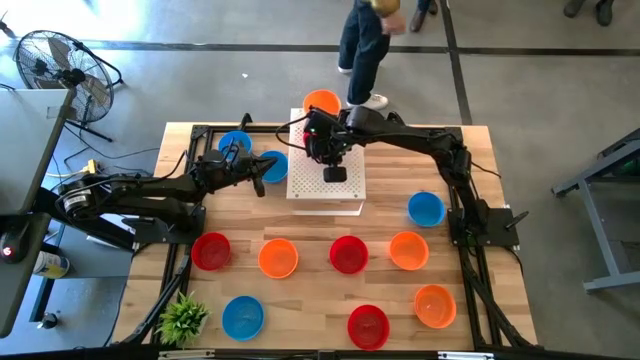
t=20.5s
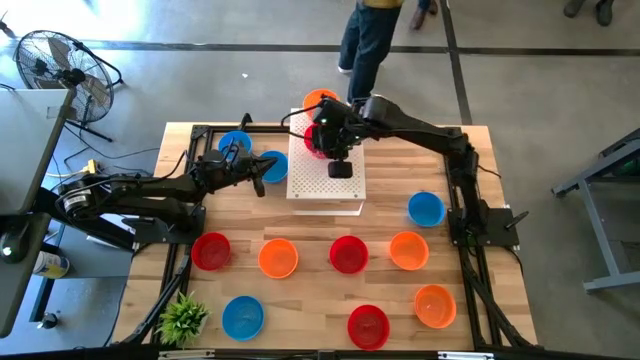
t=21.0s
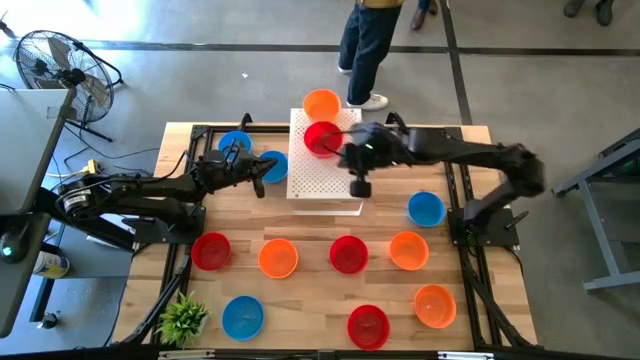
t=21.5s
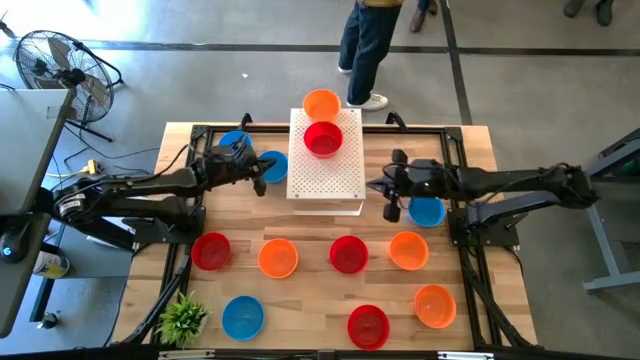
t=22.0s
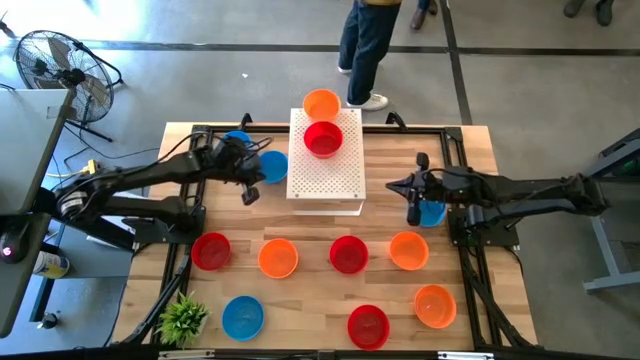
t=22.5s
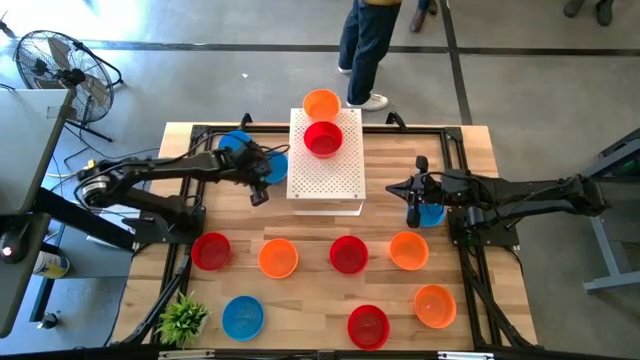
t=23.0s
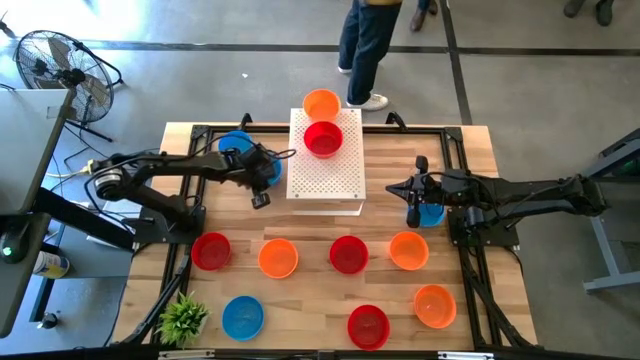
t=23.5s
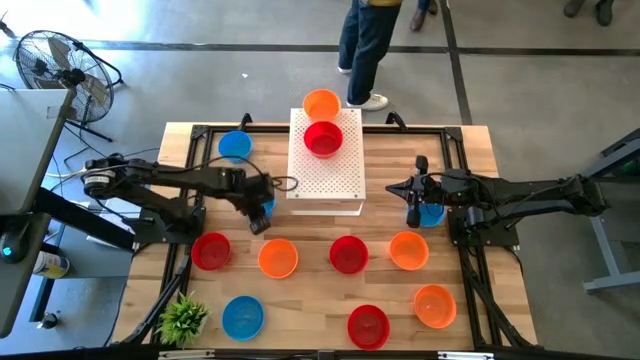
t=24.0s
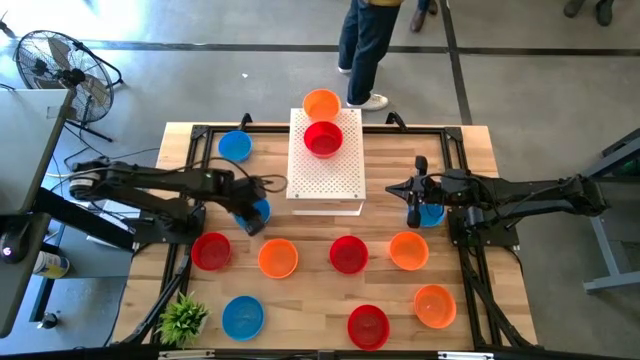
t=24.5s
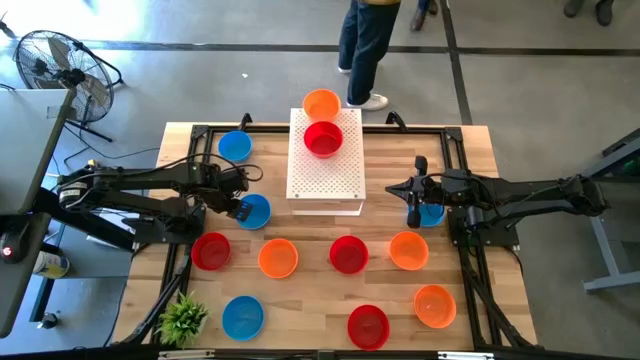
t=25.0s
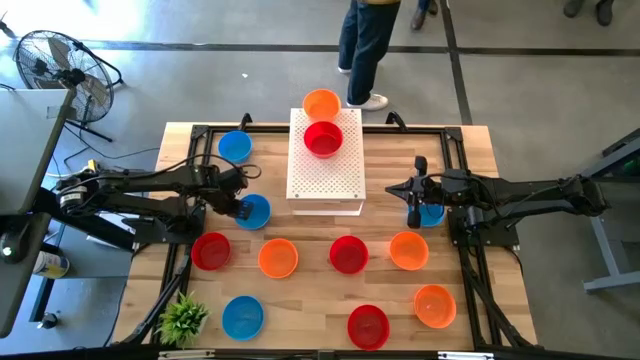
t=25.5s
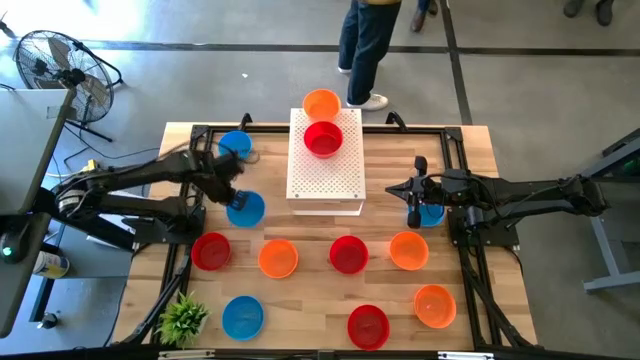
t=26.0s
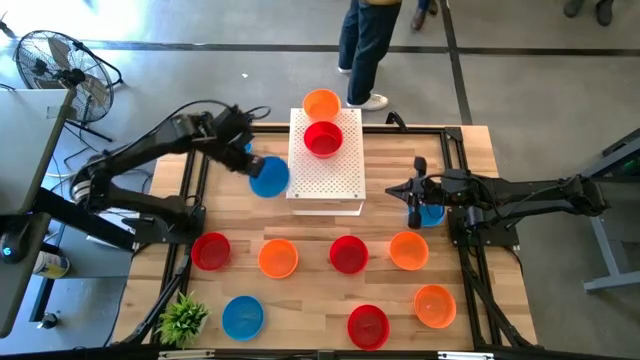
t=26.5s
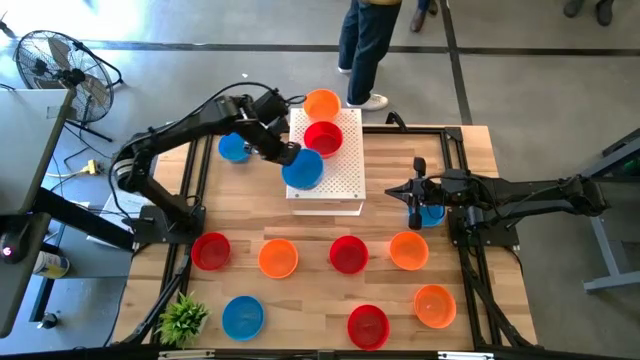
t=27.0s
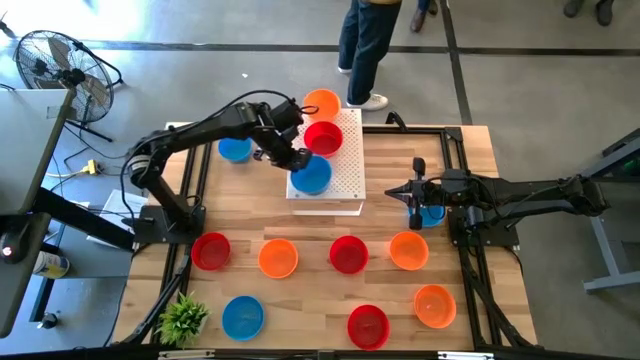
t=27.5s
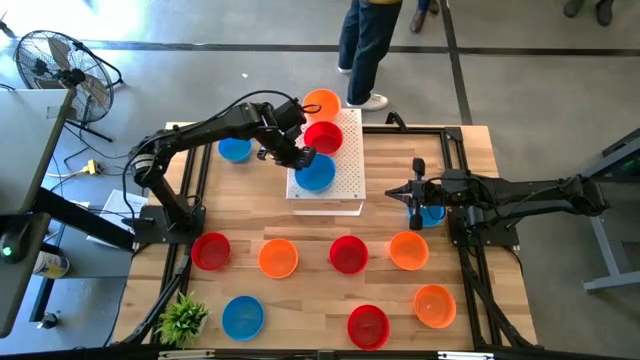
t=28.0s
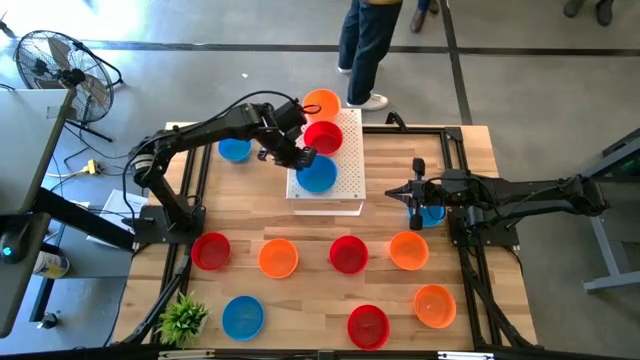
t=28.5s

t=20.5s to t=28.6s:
Task: Pick & Place Mini bowls
Put the blue bowl on the shelf

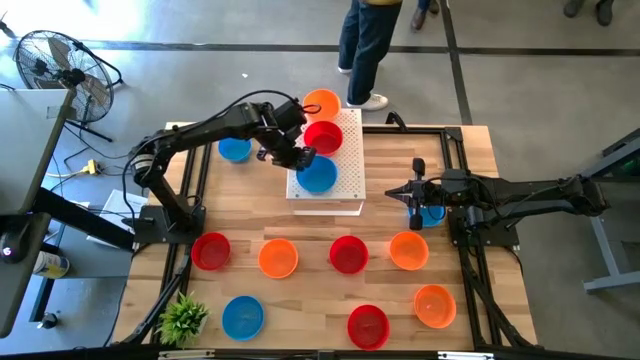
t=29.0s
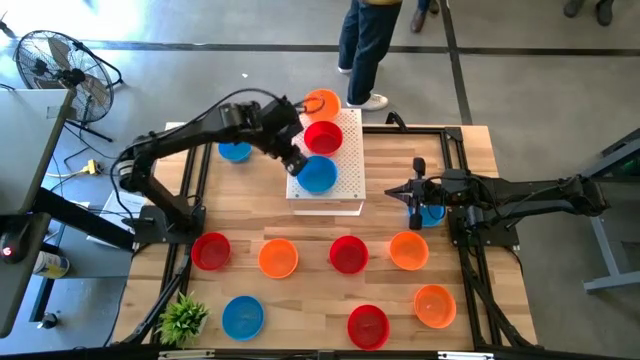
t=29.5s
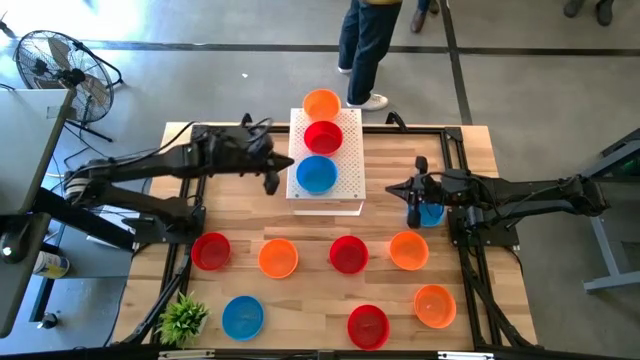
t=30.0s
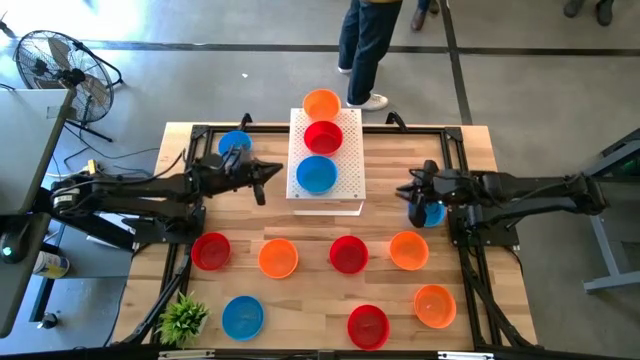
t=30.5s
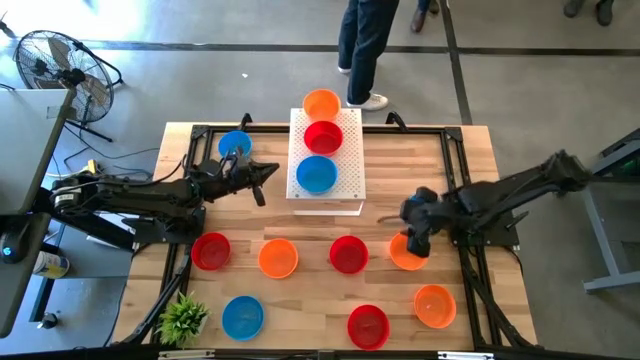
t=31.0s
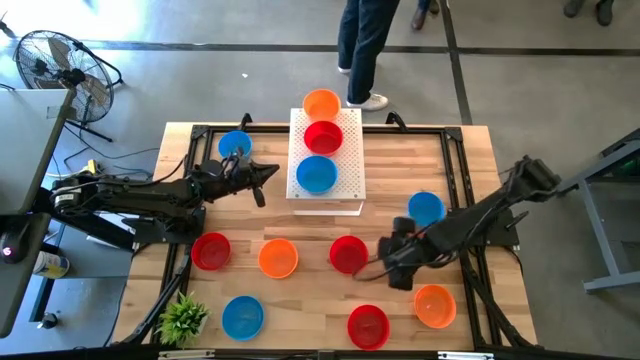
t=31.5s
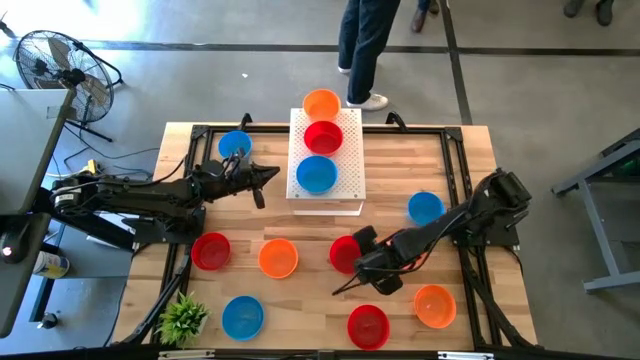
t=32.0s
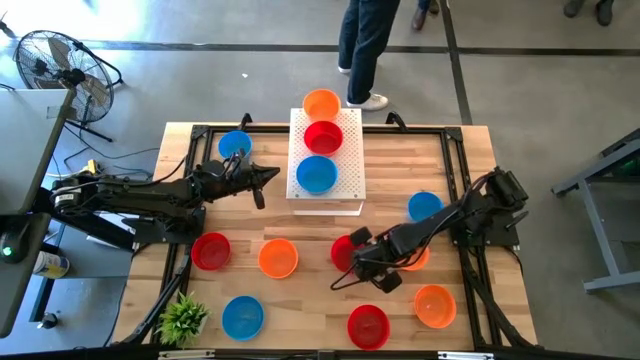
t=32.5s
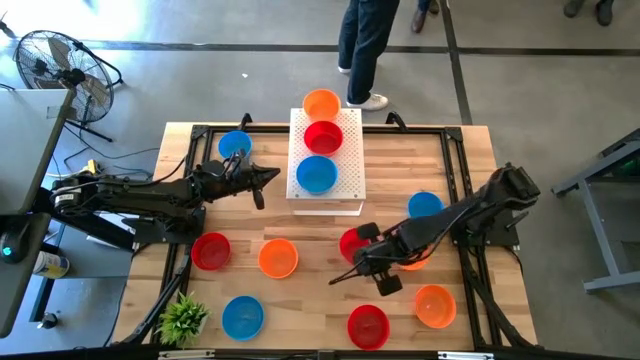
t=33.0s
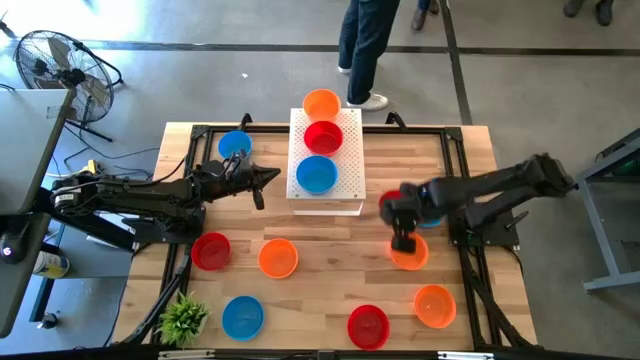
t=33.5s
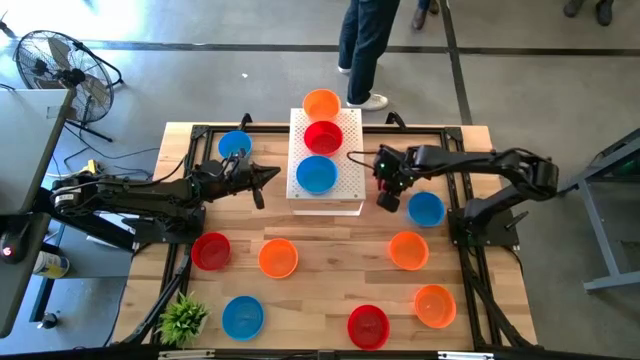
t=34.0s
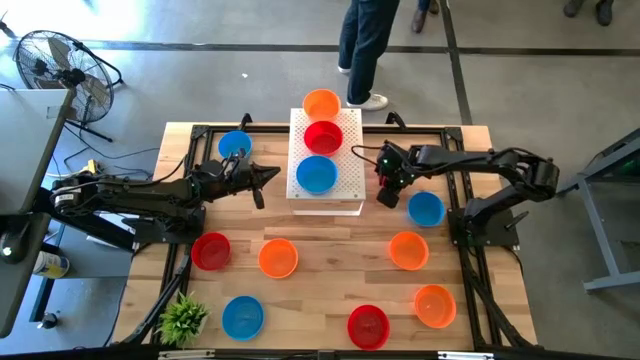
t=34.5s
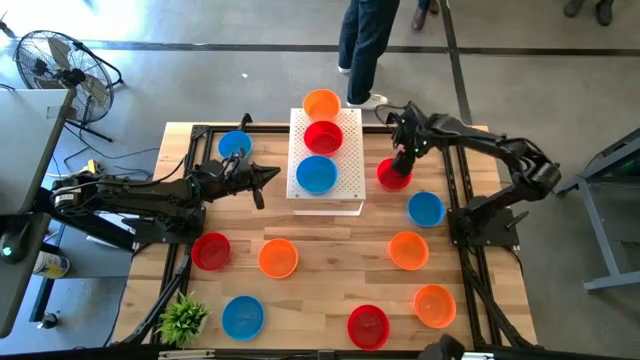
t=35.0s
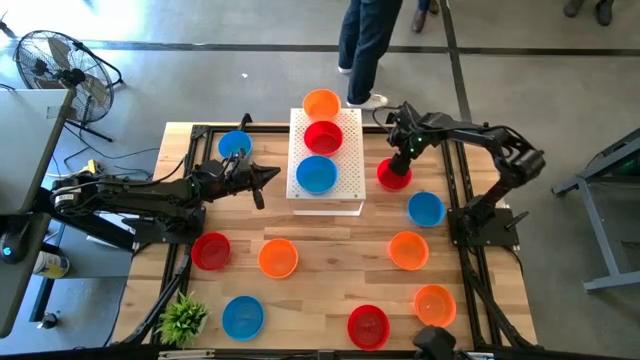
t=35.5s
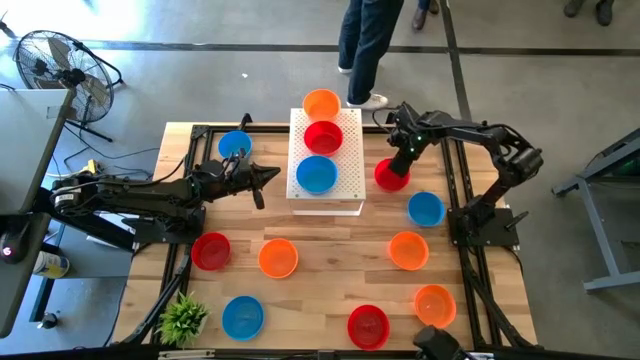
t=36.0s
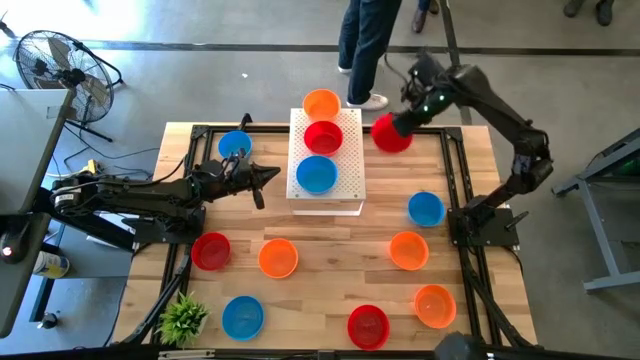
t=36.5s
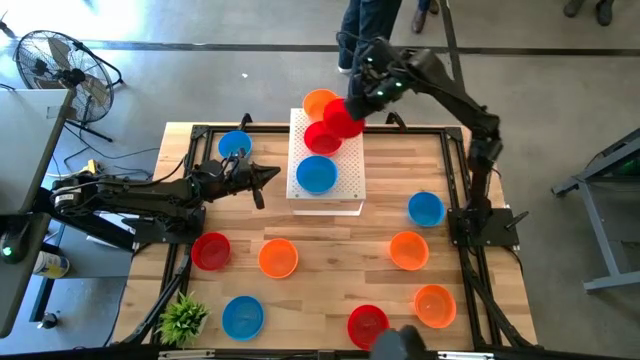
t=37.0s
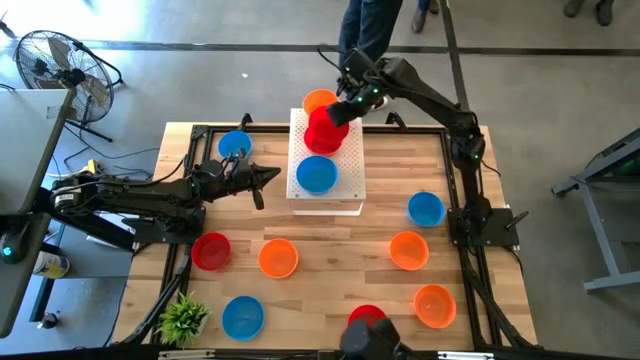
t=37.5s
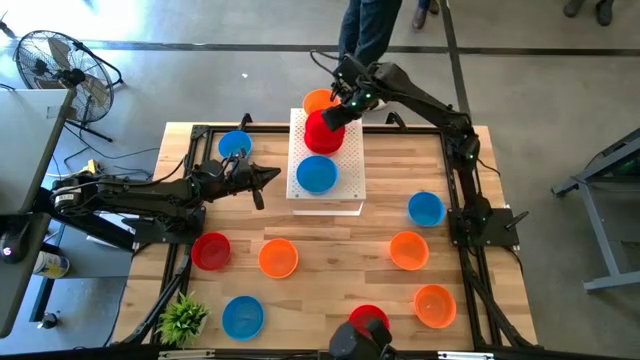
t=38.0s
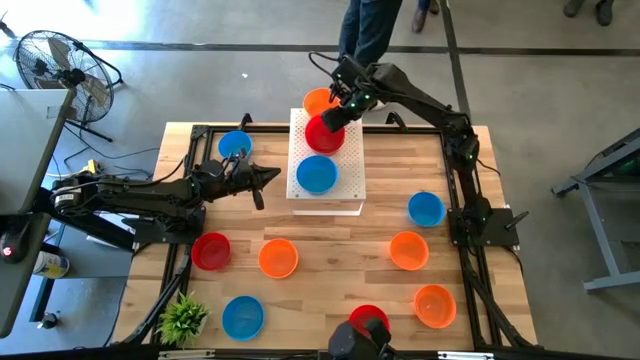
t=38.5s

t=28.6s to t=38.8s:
Stack the red bowl on top of the other red bowl on the shelf

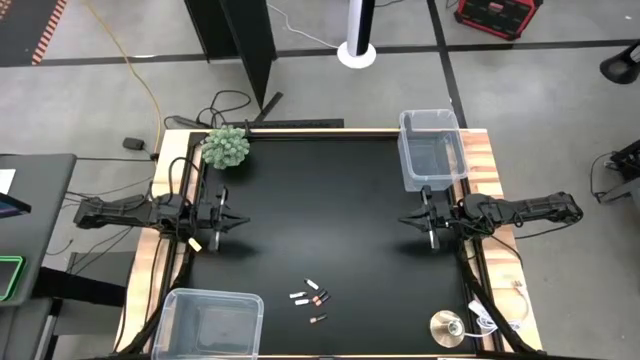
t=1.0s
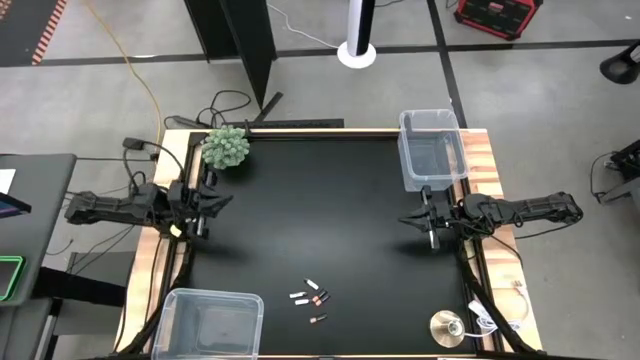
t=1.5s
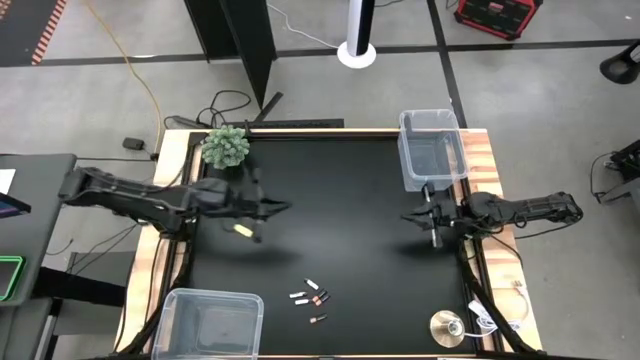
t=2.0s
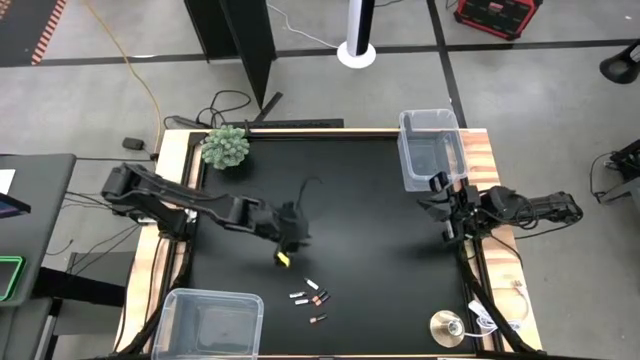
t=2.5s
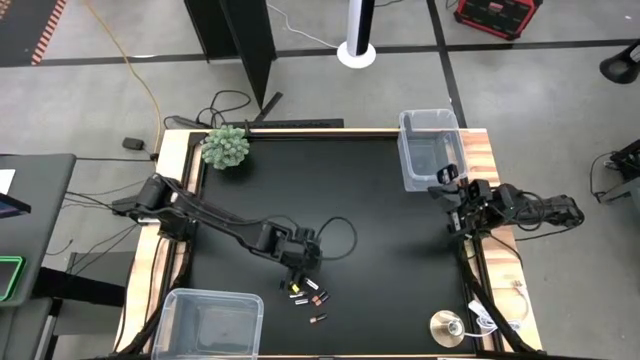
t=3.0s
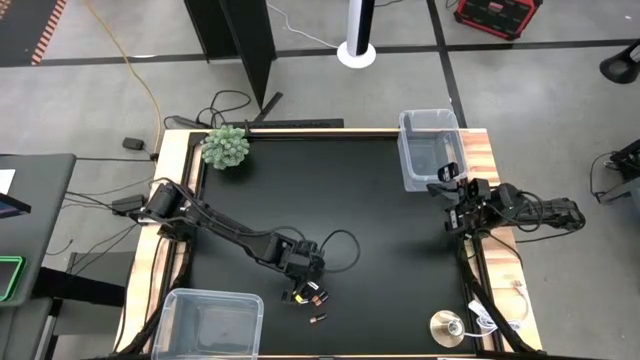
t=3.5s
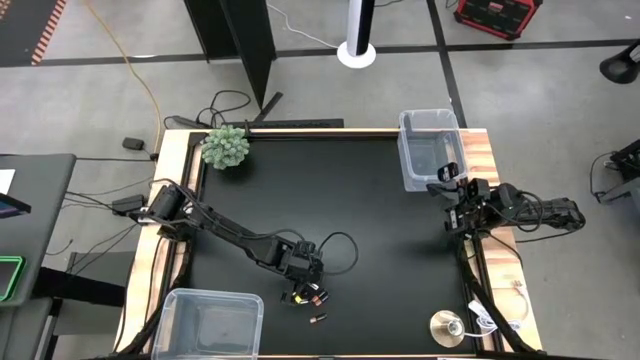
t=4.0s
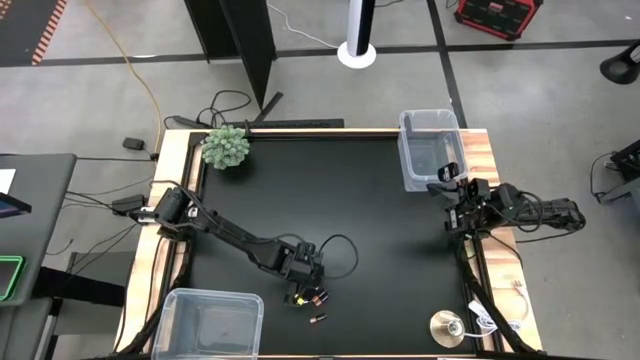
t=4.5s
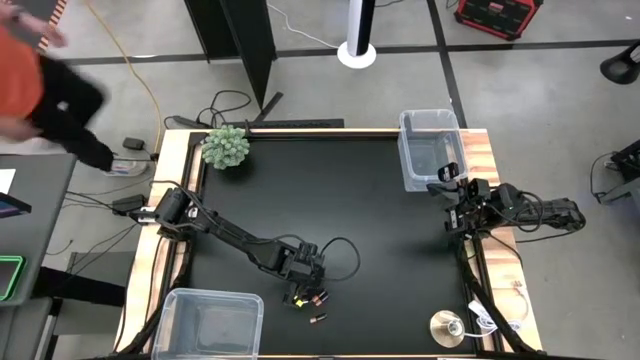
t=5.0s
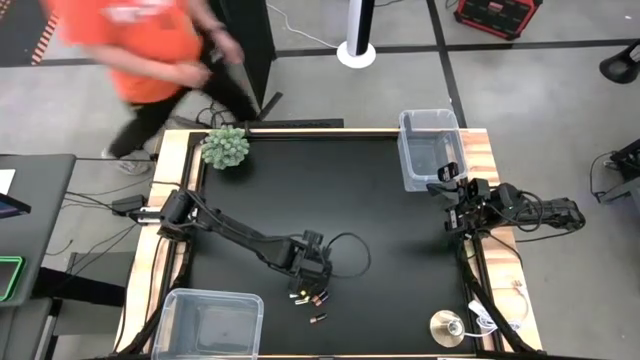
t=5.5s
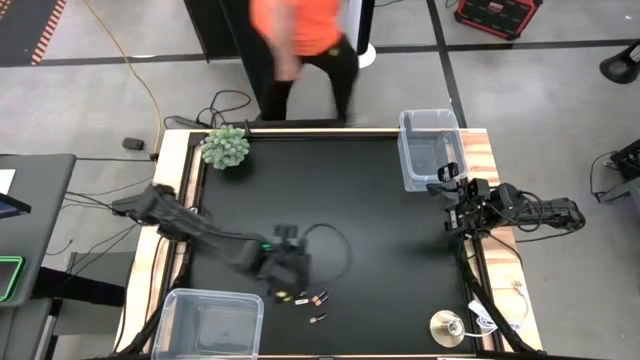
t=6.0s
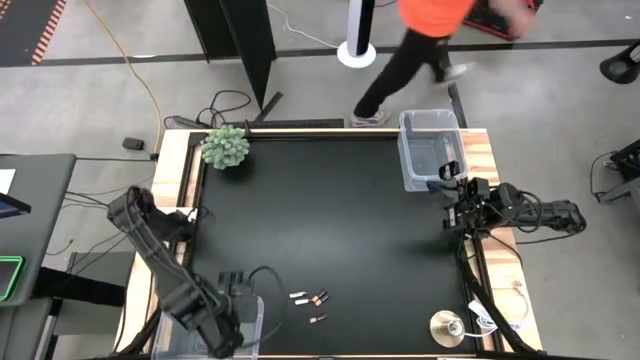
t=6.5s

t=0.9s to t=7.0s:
Task: Sort batteries
Put the top silver battery into the bottom transparent bin
